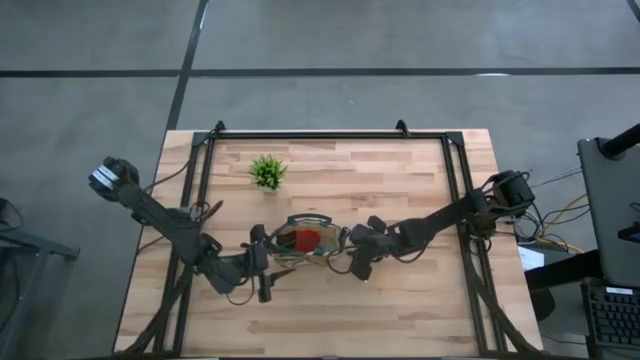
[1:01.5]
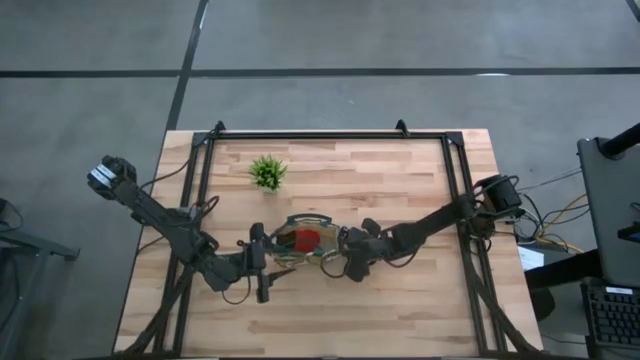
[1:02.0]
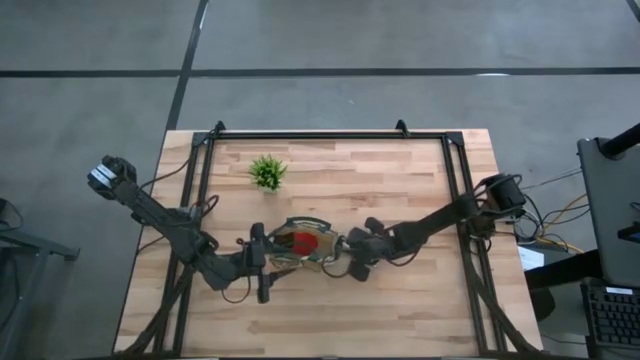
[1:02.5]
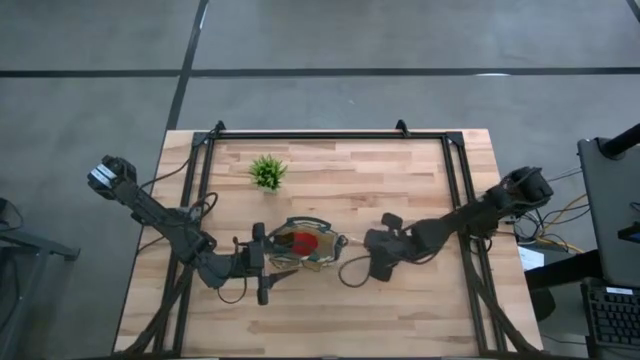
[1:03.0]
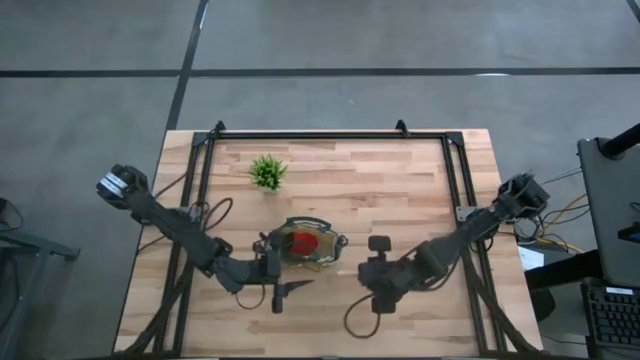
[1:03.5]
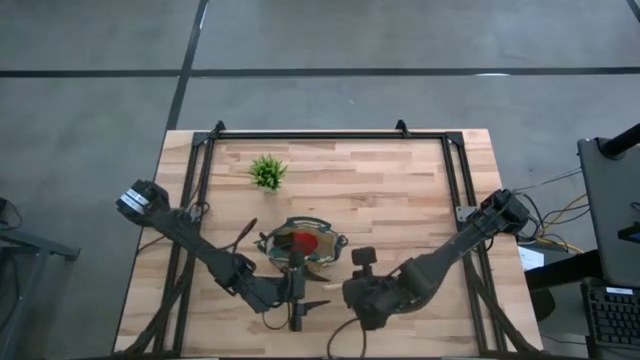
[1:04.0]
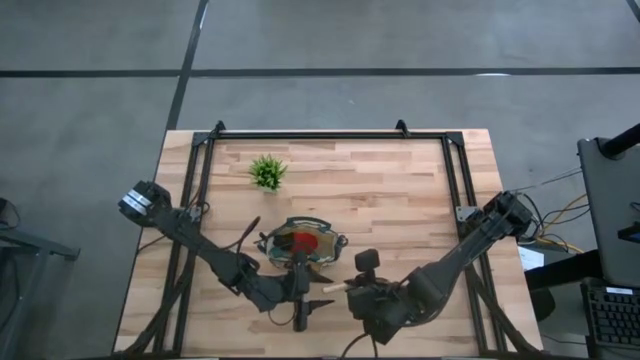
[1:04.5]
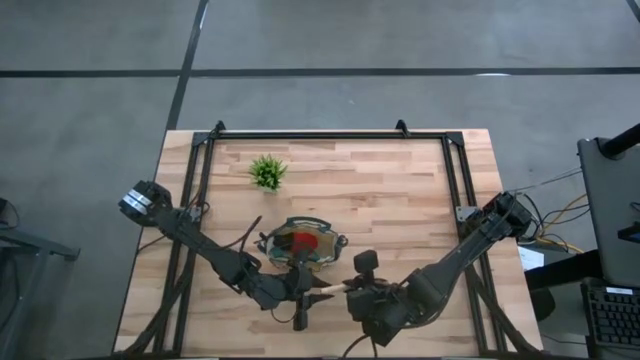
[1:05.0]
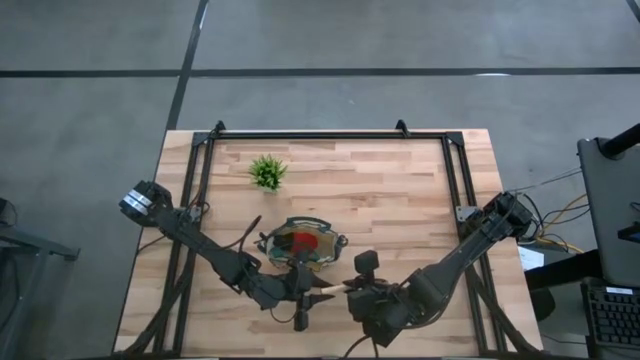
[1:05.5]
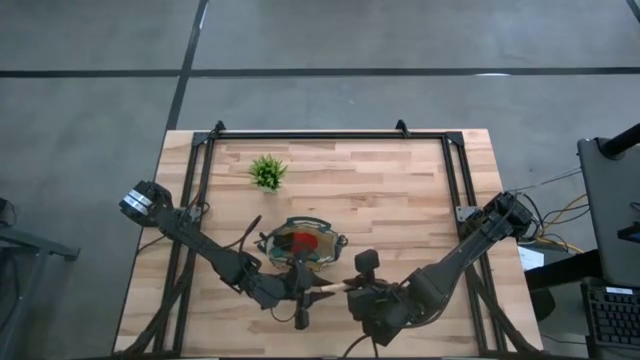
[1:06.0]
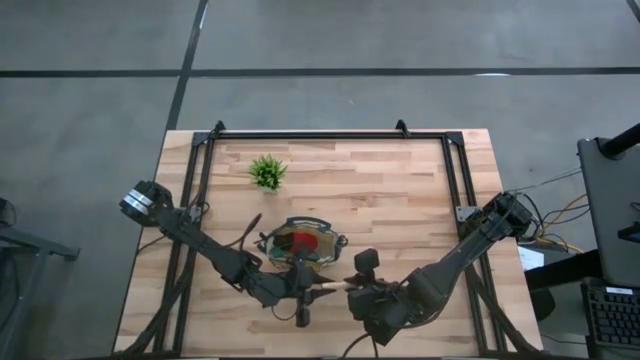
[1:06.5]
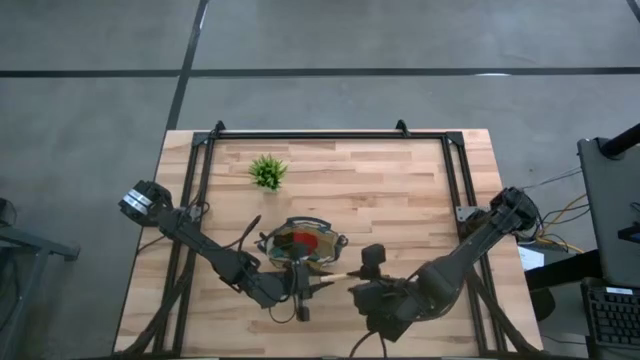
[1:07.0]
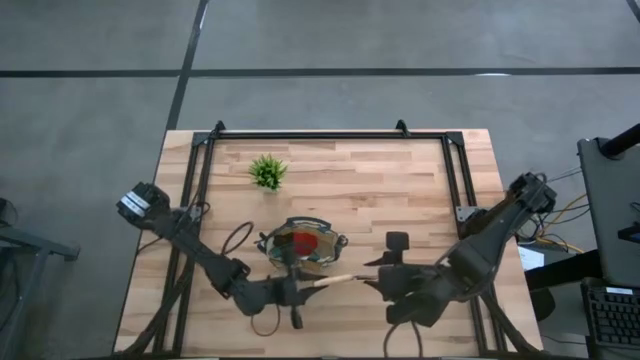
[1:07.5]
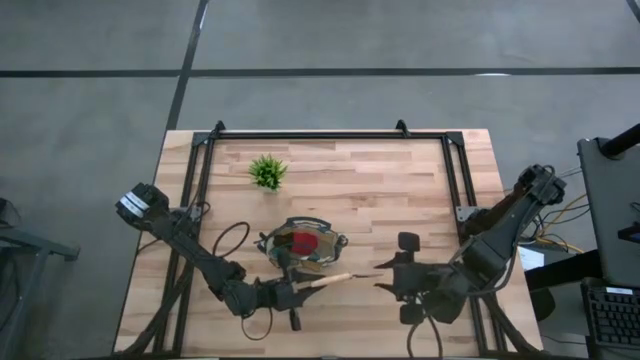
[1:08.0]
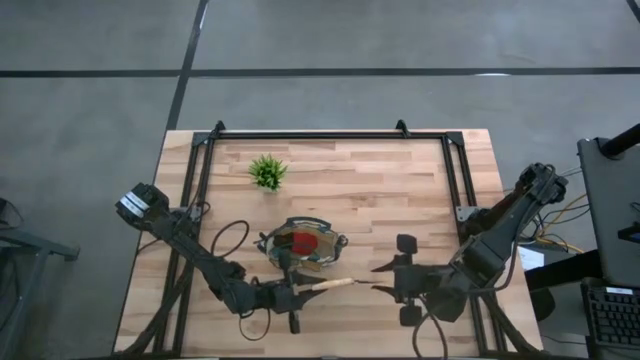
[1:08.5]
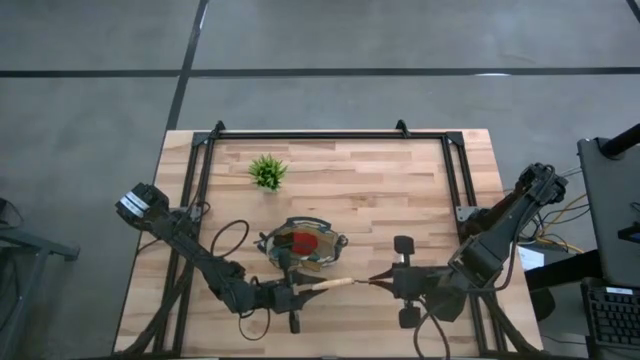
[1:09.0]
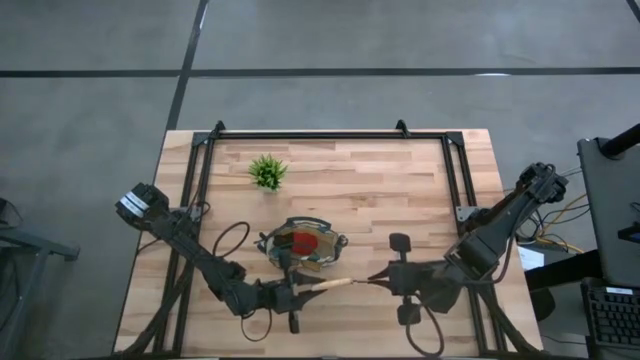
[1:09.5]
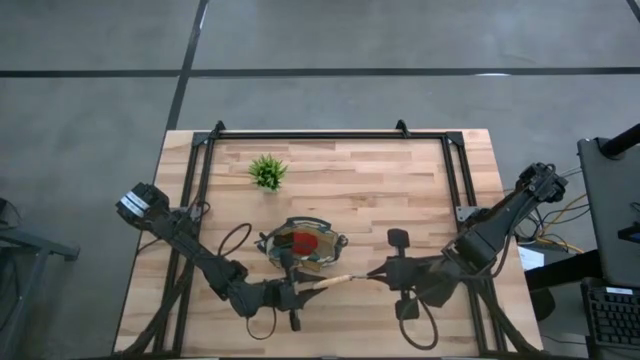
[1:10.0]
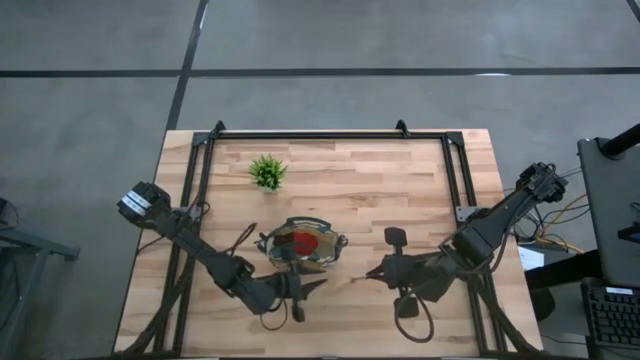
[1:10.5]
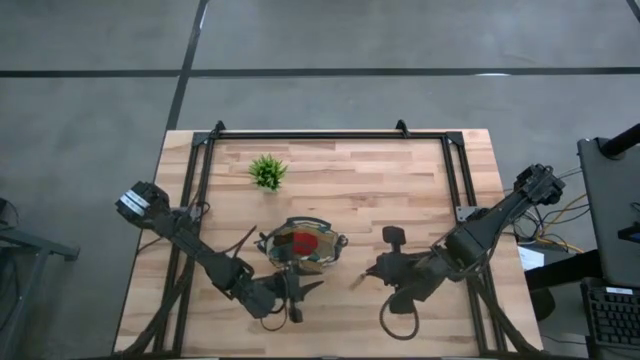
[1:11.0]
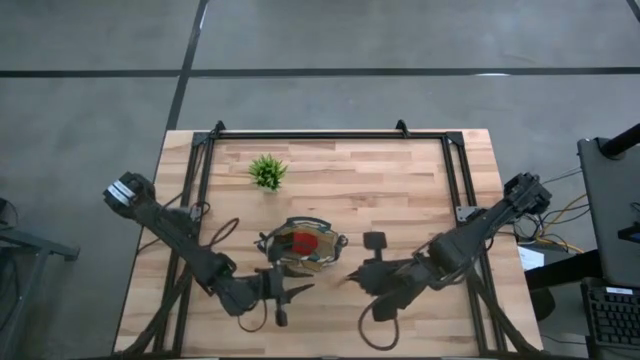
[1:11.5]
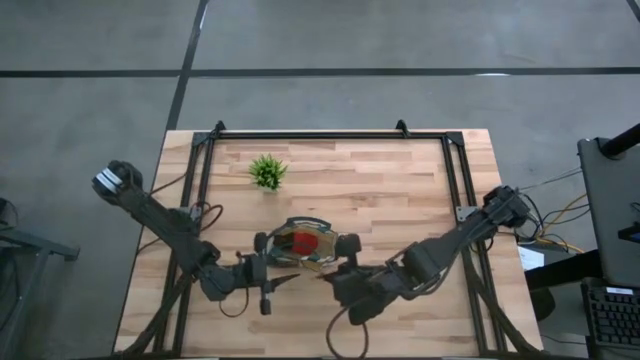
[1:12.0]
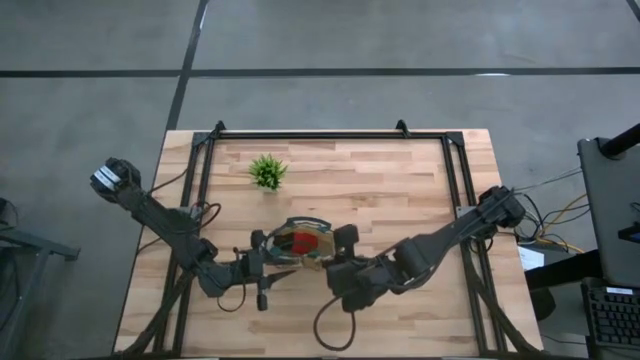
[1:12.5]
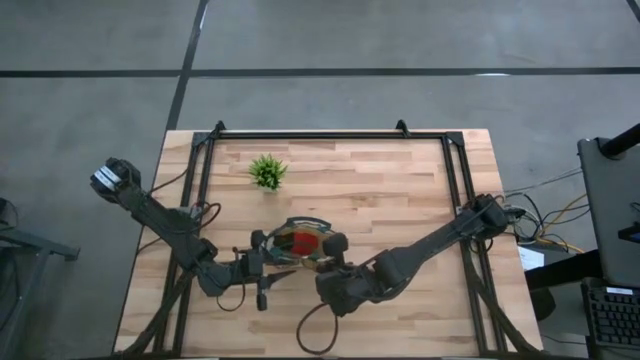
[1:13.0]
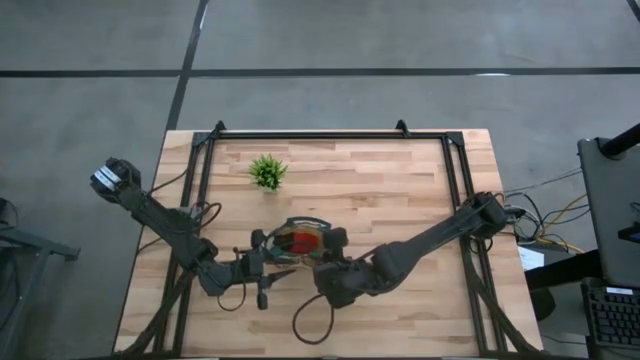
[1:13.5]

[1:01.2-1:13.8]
Task: Pick & Place Garden tools in Gardening bag
Put the trowel into the gardening bag

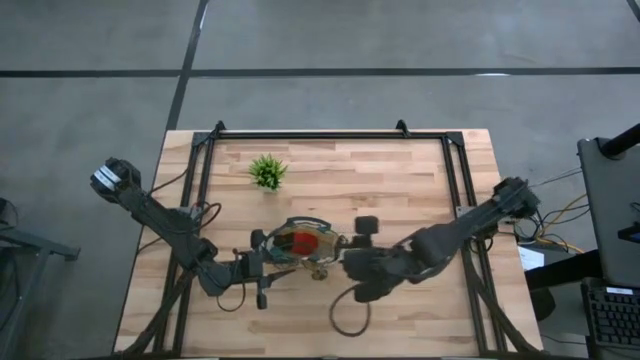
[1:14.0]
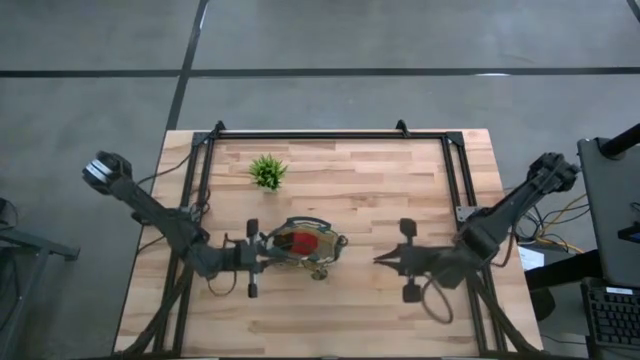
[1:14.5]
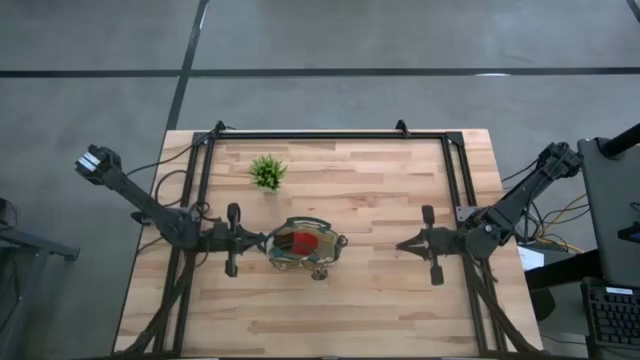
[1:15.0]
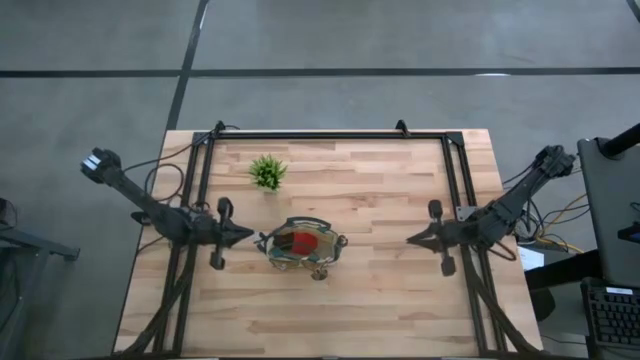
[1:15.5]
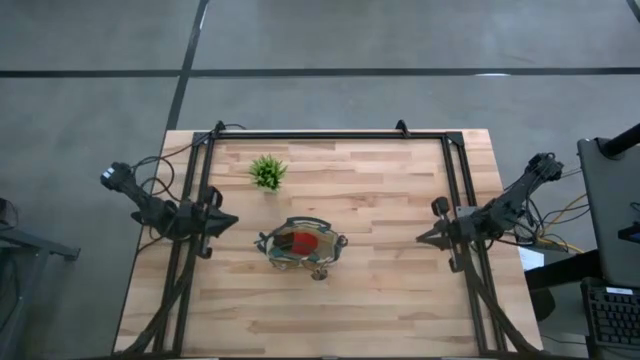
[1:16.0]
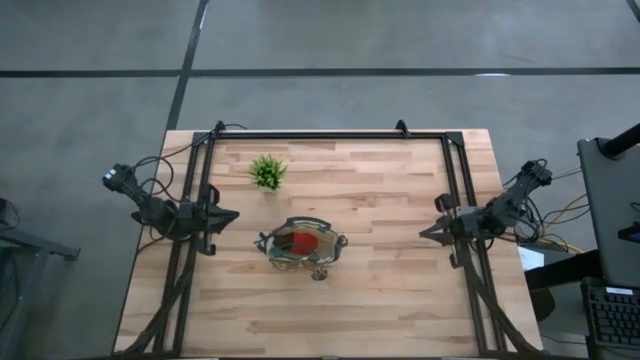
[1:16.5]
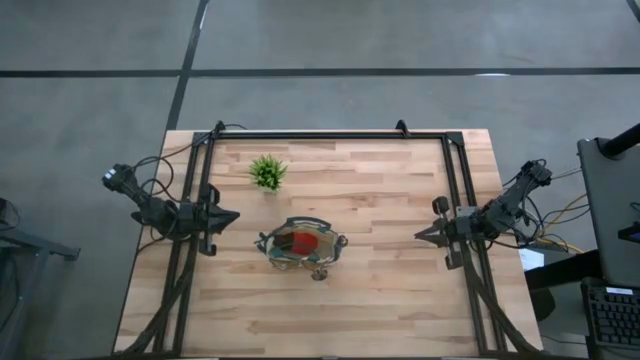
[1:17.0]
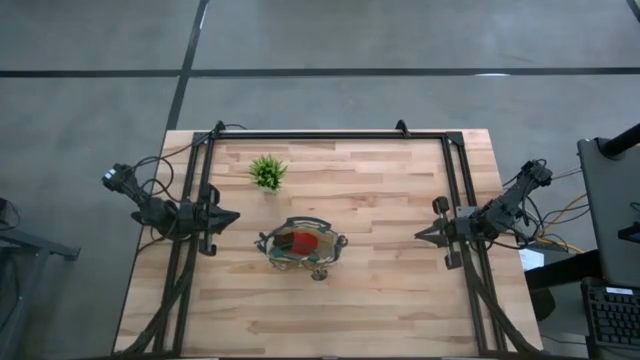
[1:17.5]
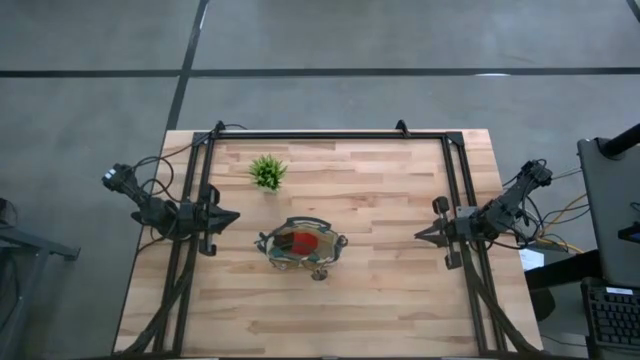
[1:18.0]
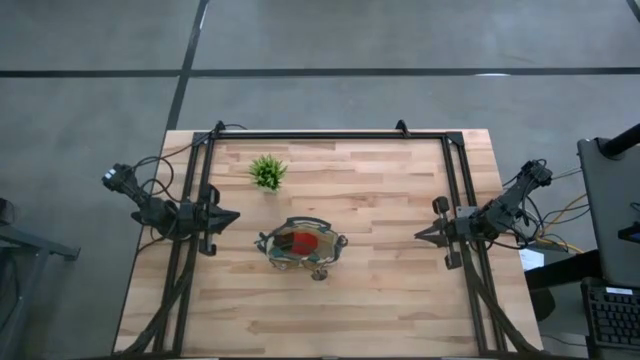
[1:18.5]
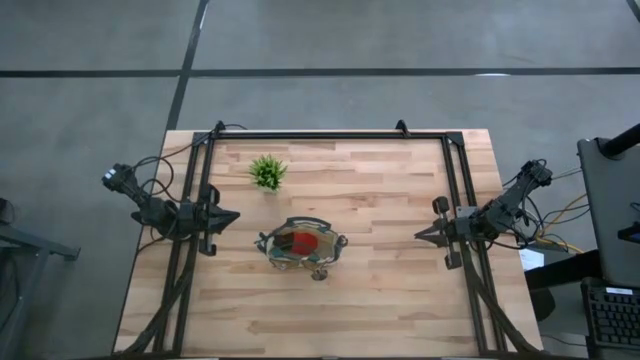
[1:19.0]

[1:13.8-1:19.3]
Return to Home Position

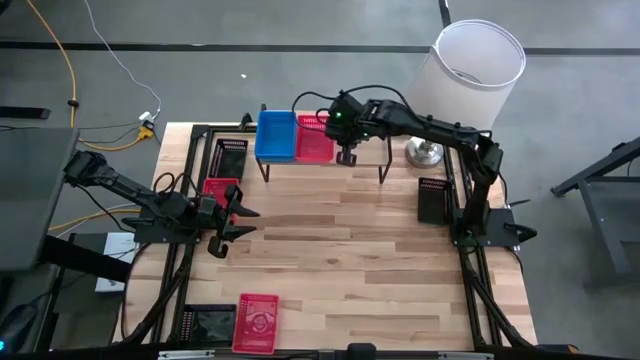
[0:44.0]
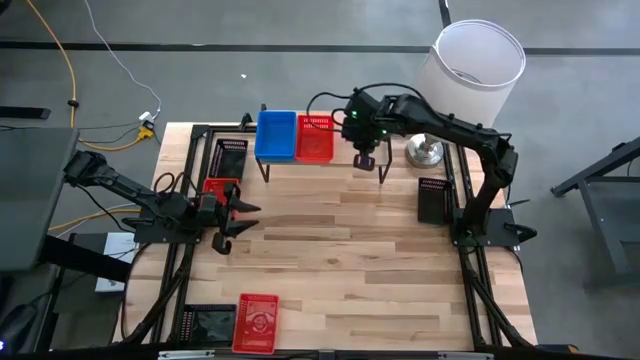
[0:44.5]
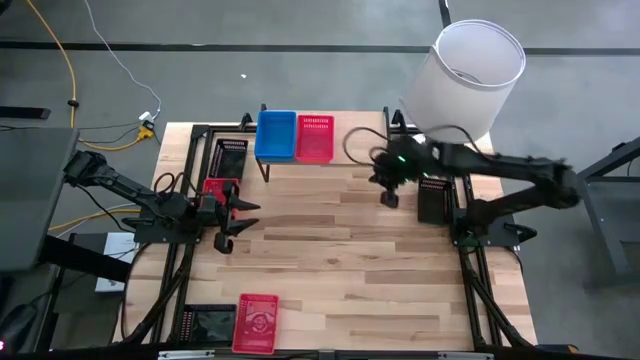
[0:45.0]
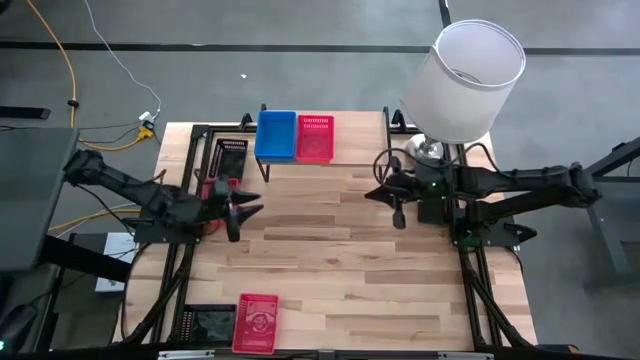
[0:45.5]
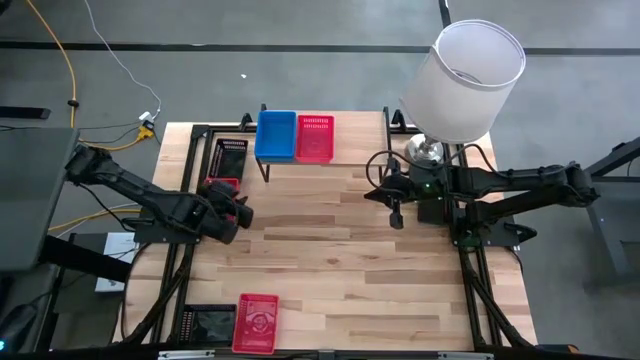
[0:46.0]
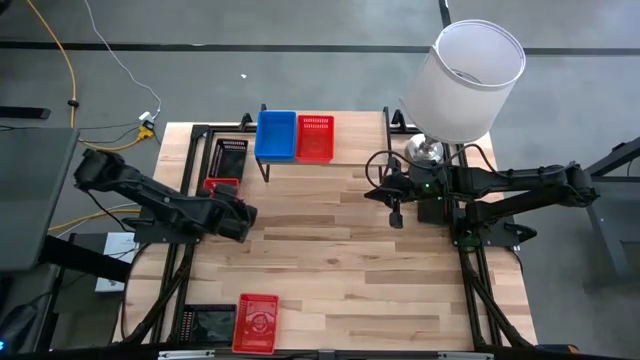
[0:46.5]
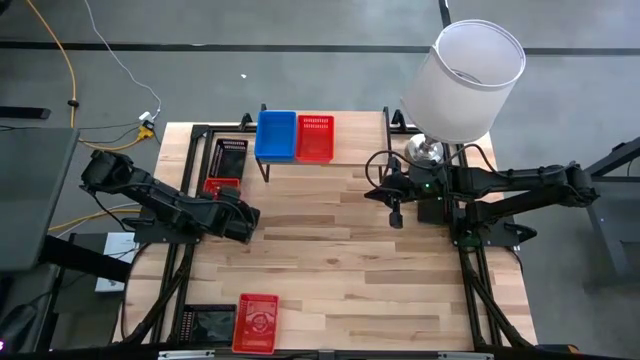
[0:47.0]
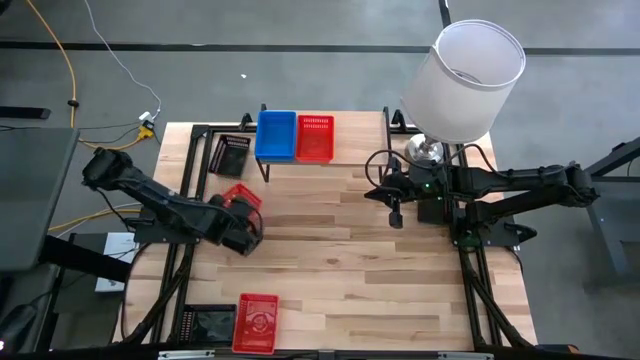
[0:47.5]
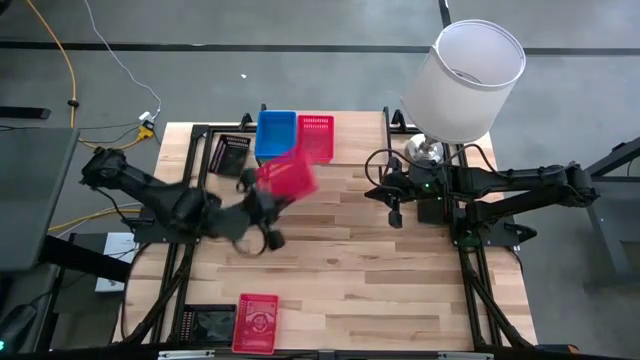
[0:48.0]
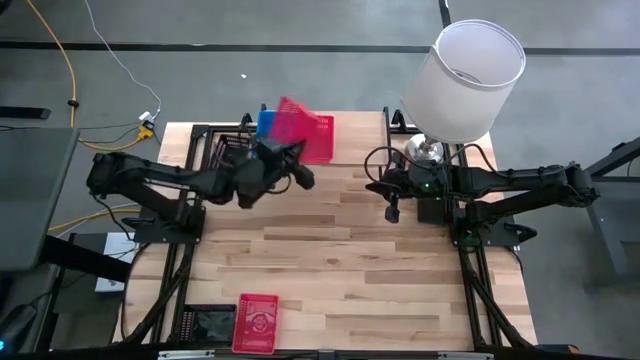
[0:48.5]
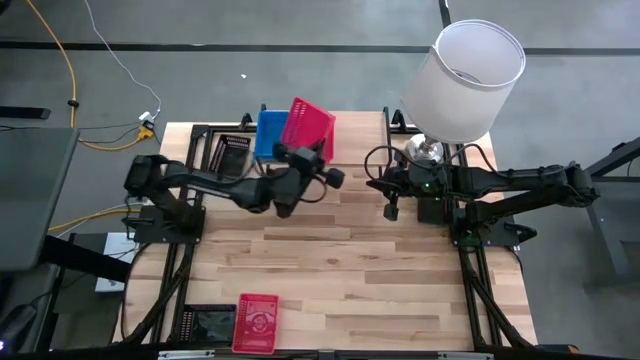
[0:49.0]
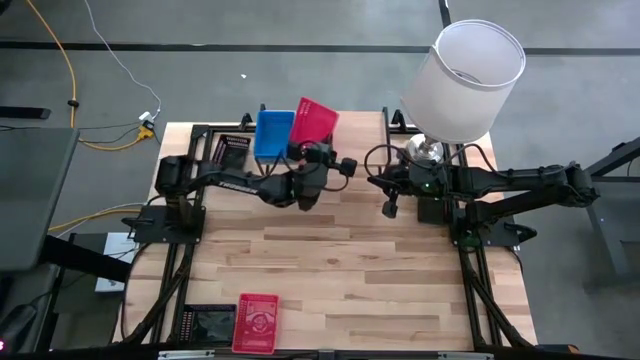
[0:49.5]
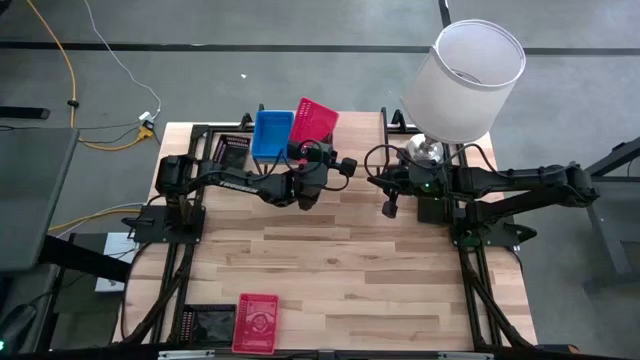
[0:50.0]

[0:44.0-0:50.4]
Task: Stack baskets on shelf by color
Stack the top red bin on top of the red bin on the shelf
